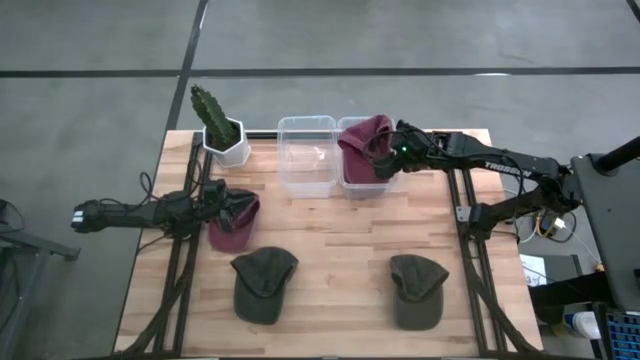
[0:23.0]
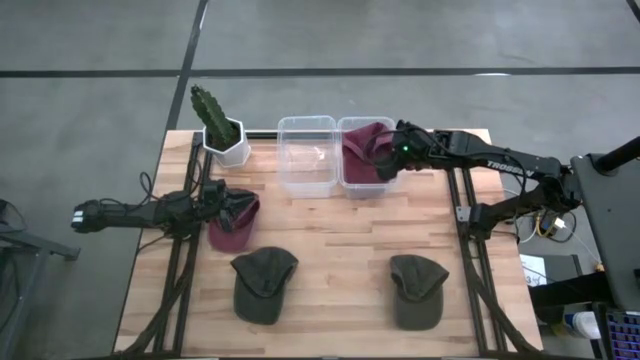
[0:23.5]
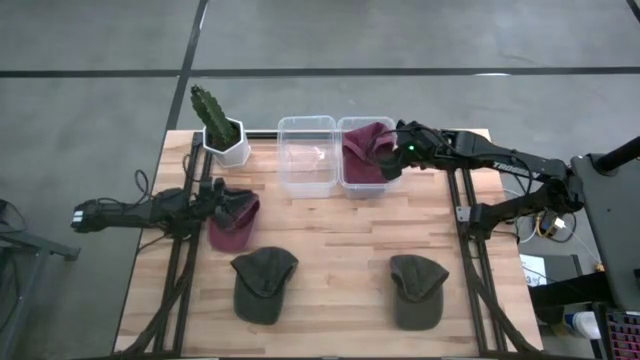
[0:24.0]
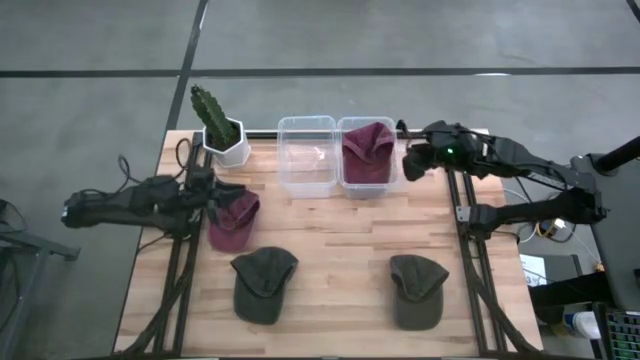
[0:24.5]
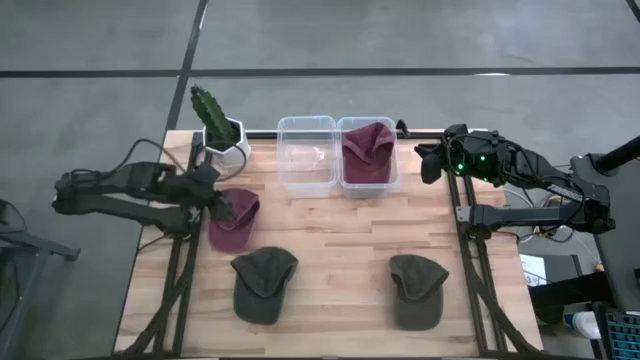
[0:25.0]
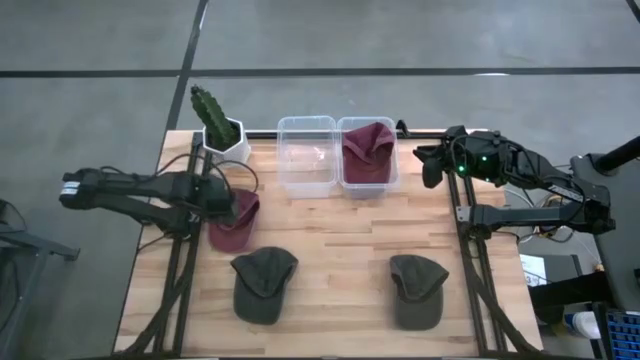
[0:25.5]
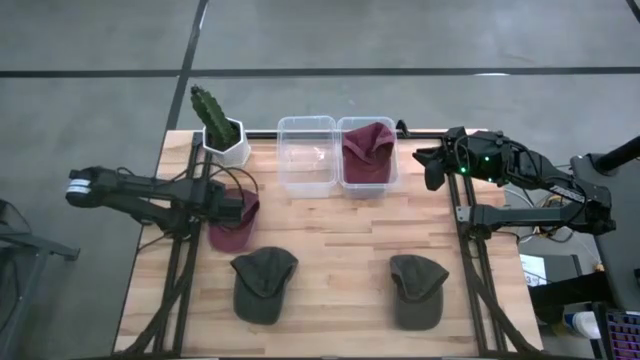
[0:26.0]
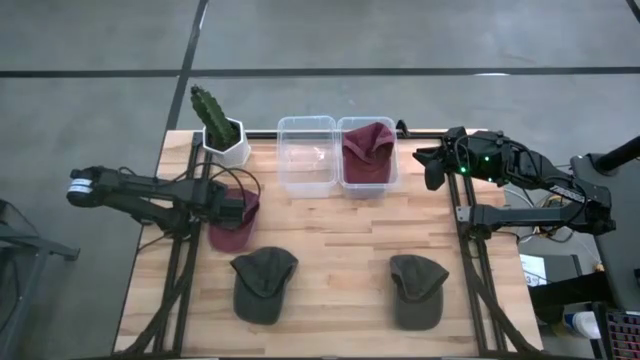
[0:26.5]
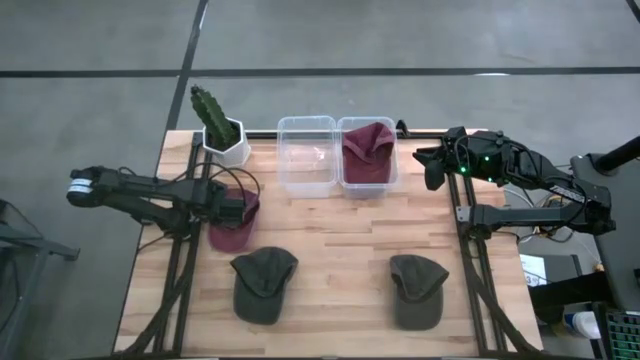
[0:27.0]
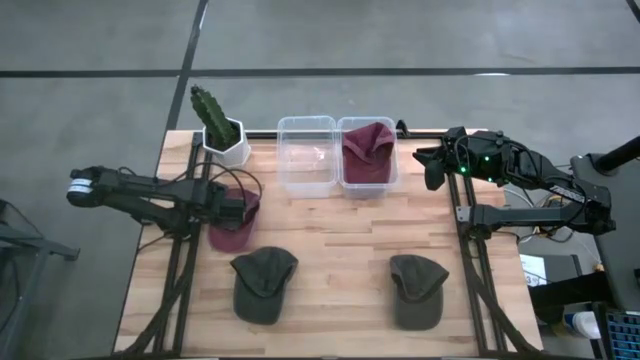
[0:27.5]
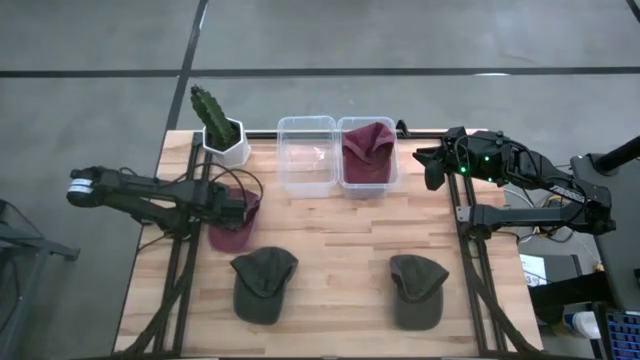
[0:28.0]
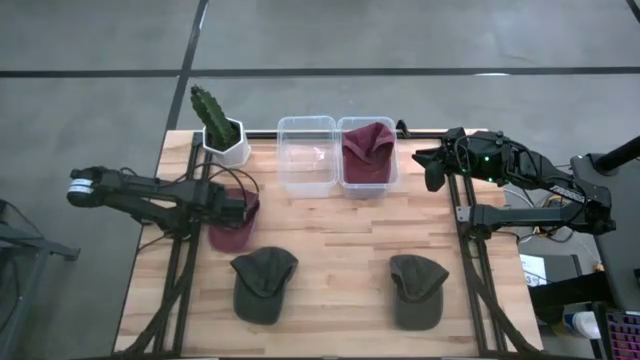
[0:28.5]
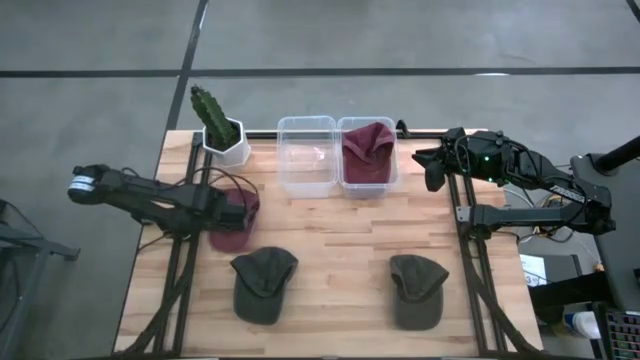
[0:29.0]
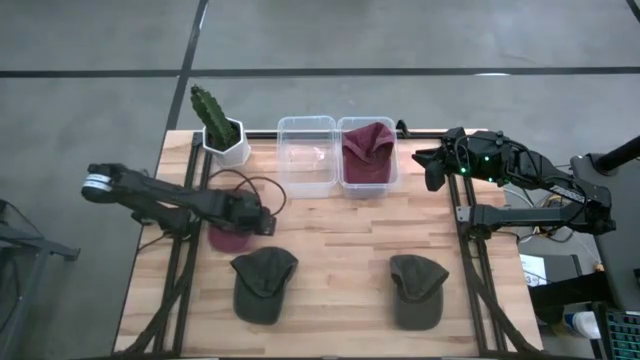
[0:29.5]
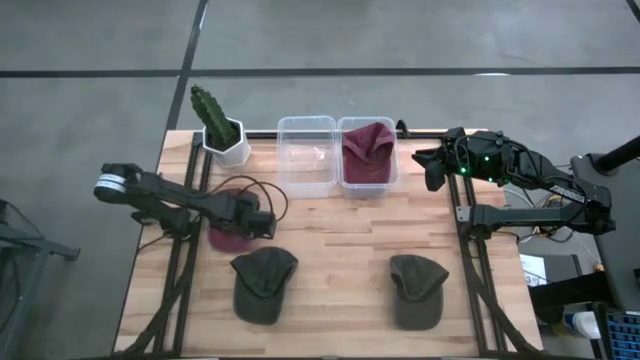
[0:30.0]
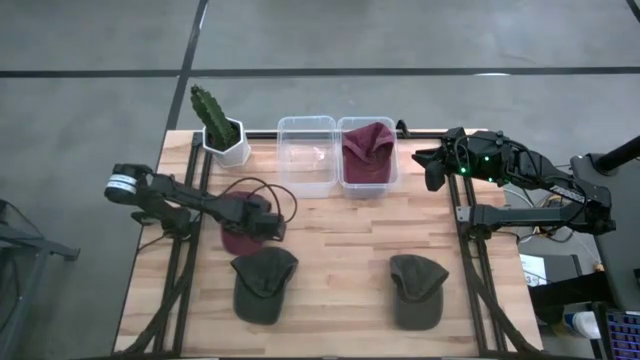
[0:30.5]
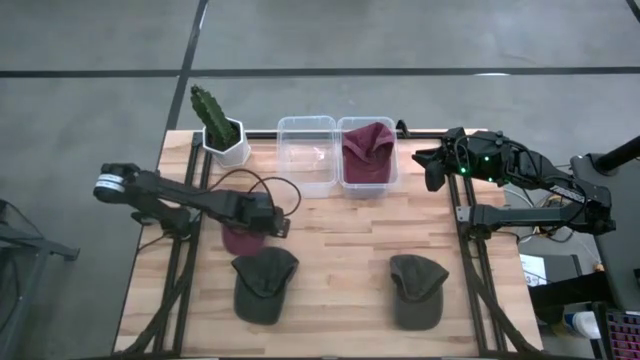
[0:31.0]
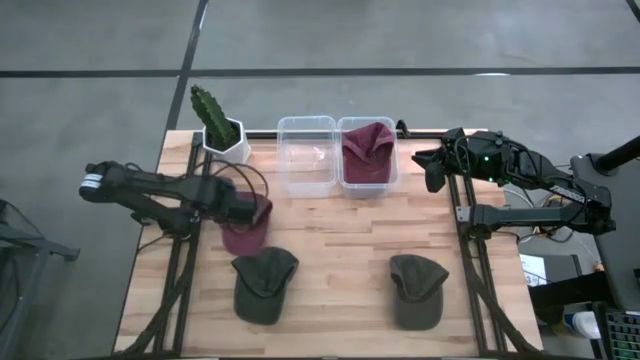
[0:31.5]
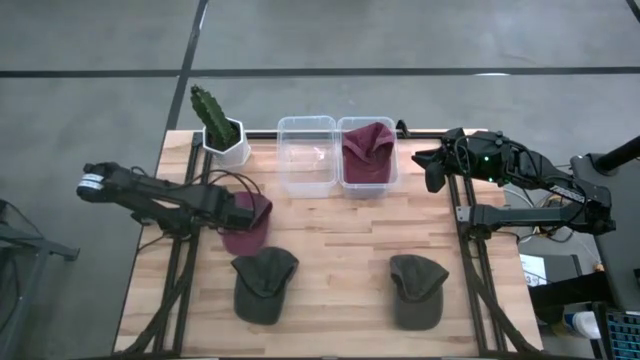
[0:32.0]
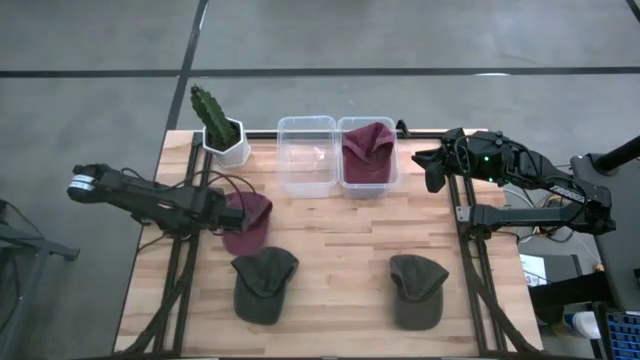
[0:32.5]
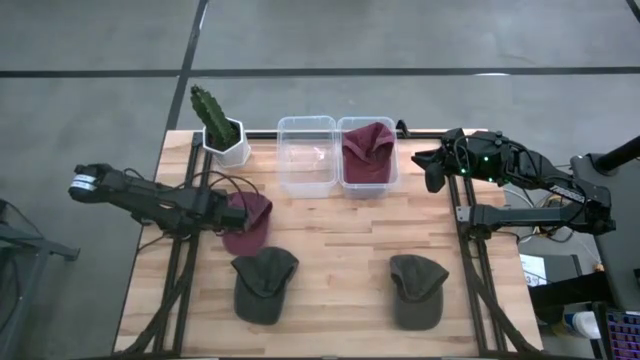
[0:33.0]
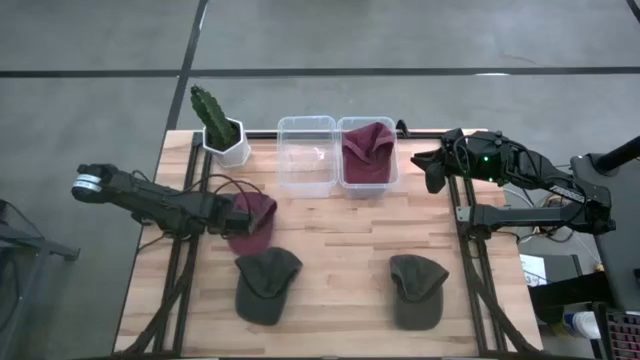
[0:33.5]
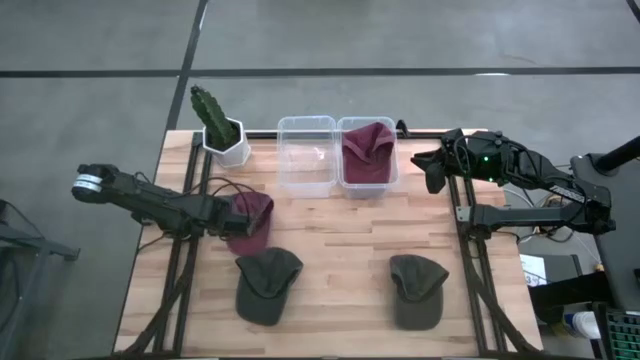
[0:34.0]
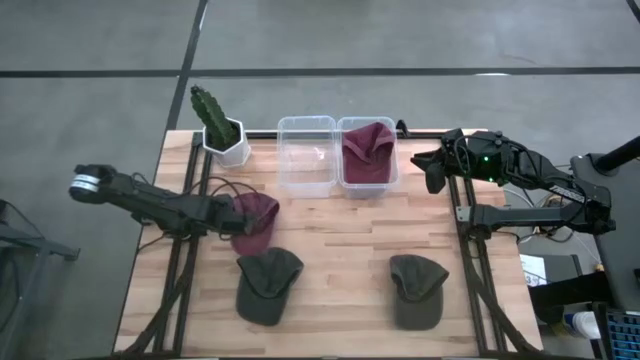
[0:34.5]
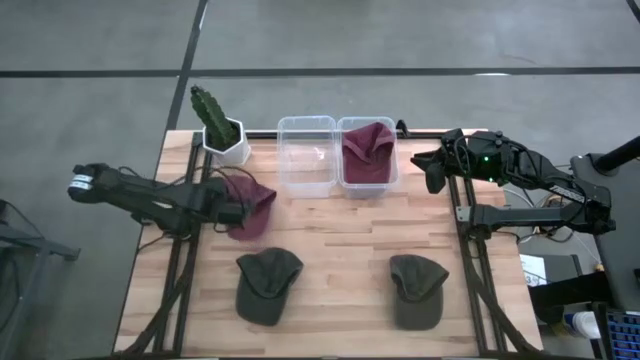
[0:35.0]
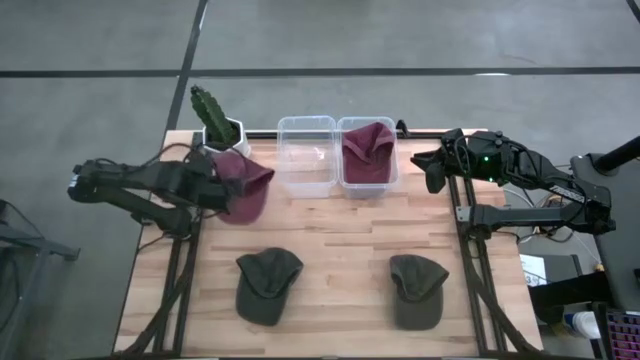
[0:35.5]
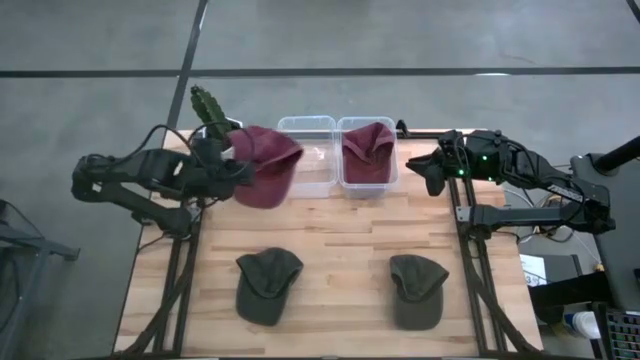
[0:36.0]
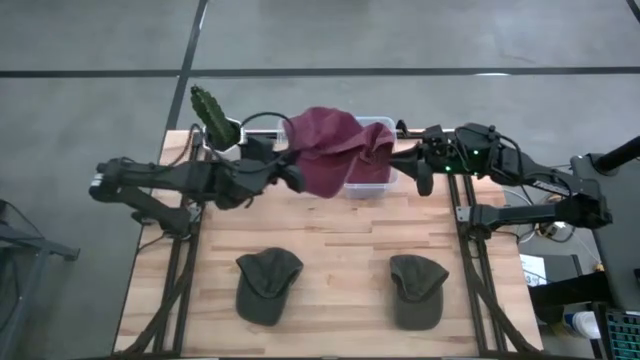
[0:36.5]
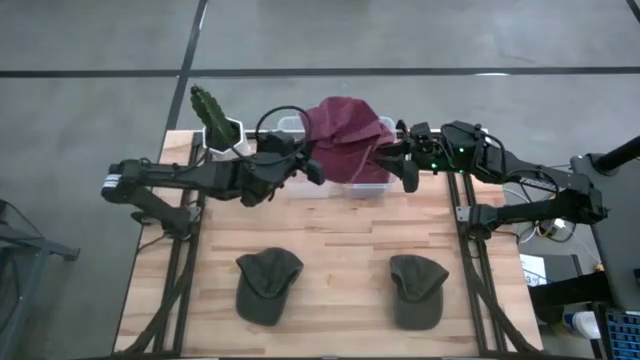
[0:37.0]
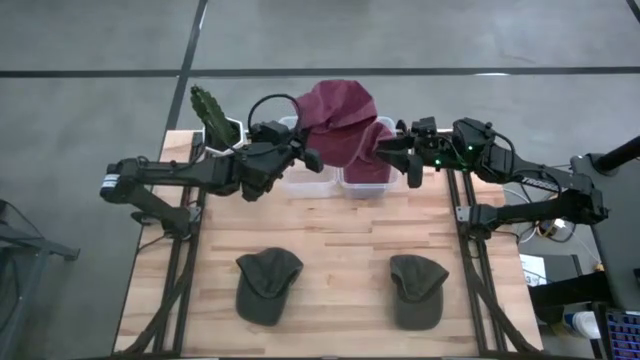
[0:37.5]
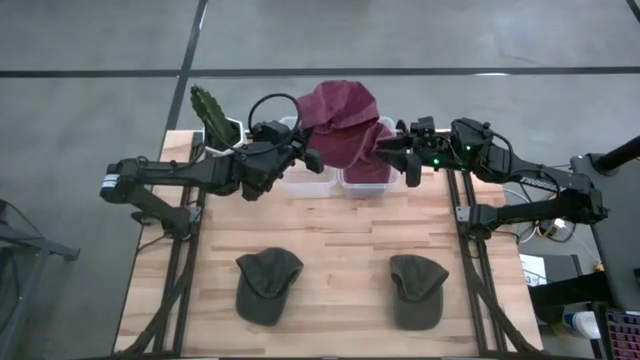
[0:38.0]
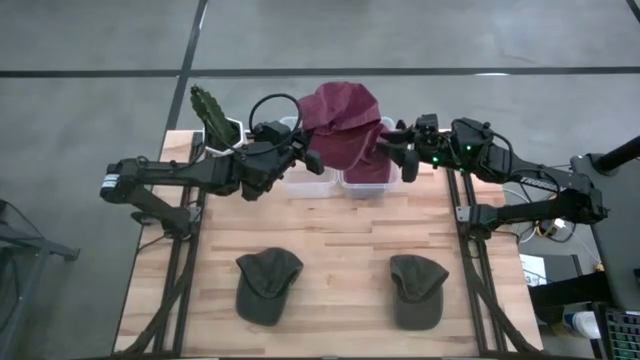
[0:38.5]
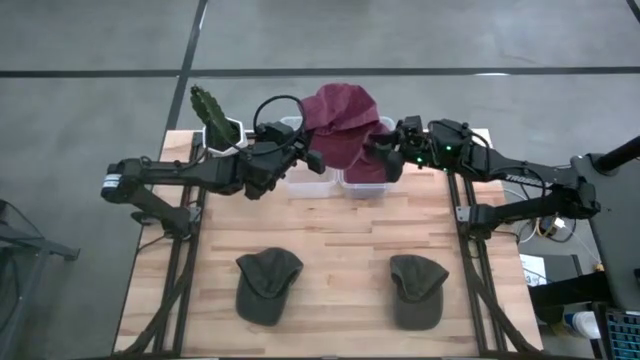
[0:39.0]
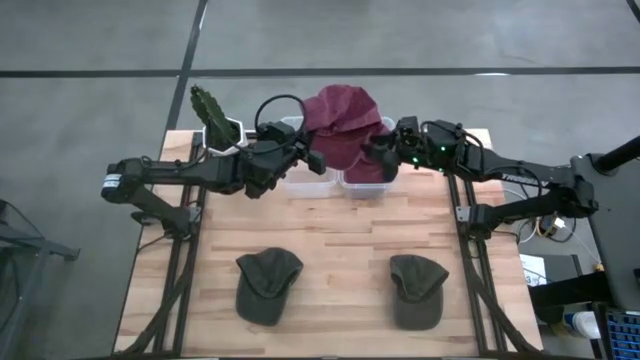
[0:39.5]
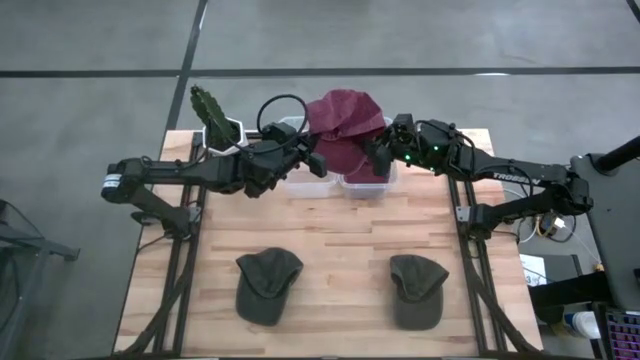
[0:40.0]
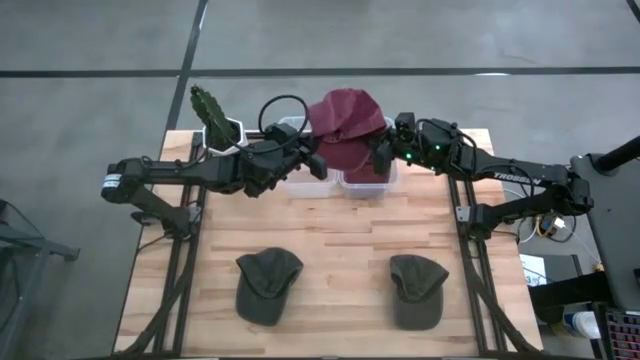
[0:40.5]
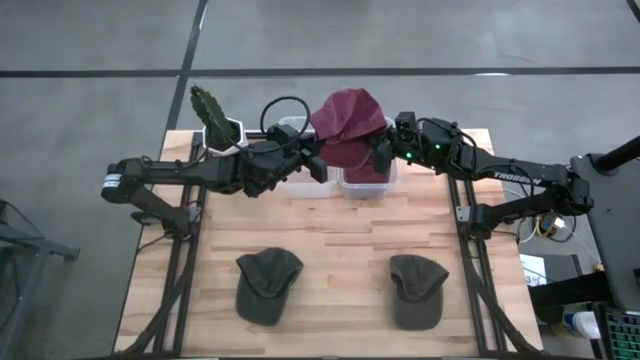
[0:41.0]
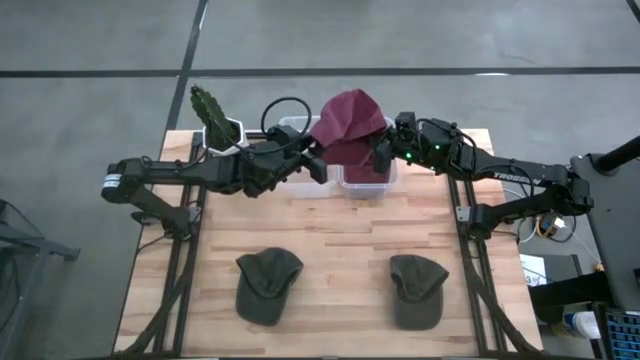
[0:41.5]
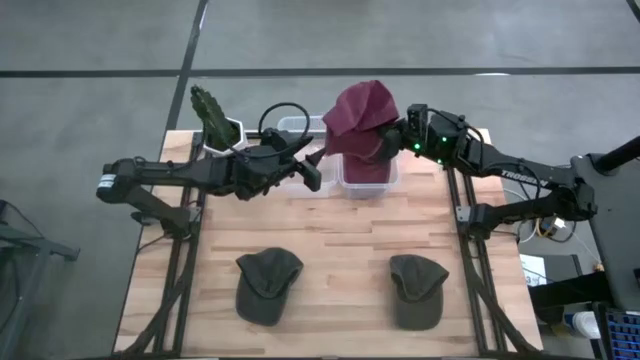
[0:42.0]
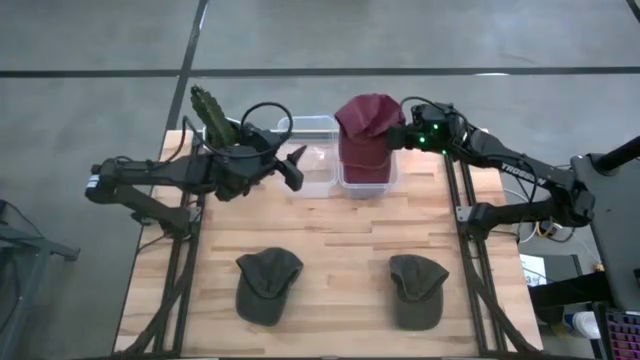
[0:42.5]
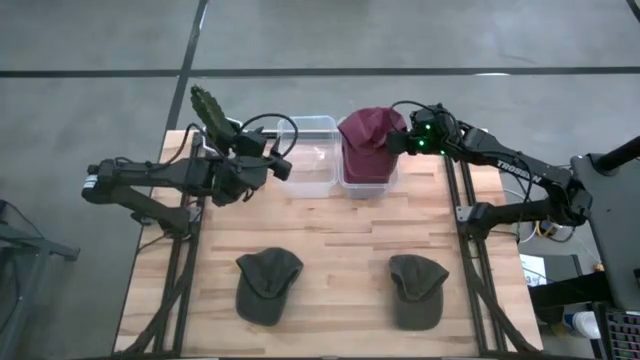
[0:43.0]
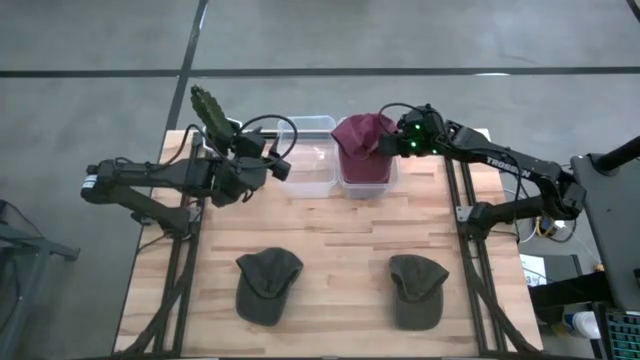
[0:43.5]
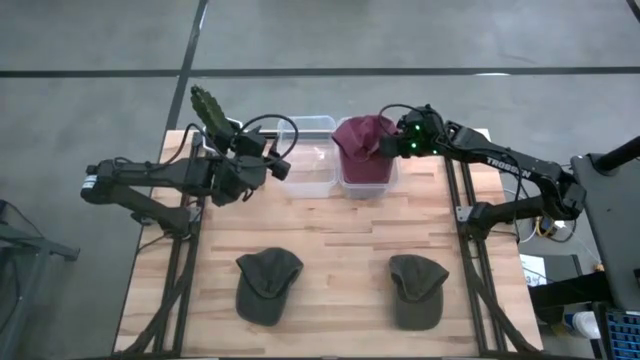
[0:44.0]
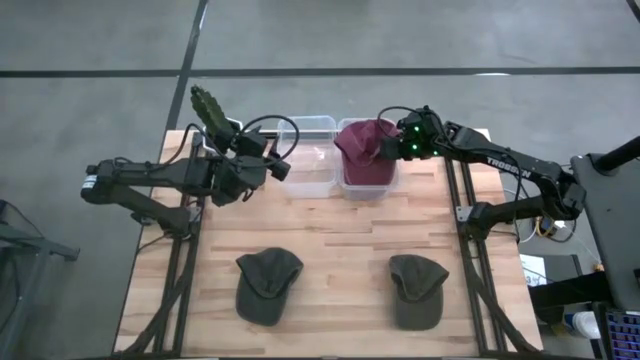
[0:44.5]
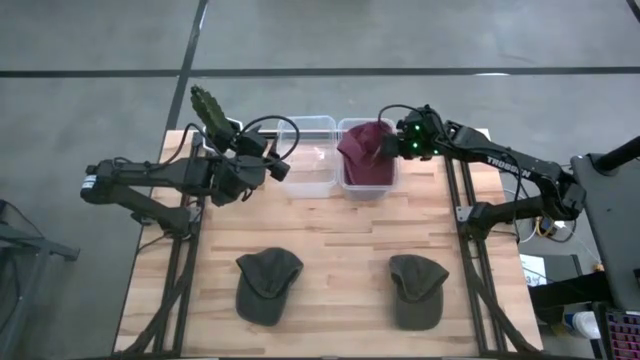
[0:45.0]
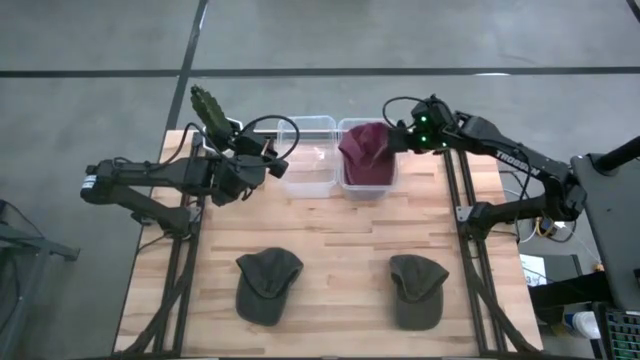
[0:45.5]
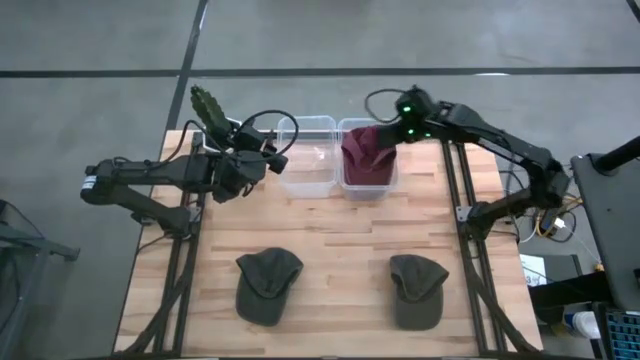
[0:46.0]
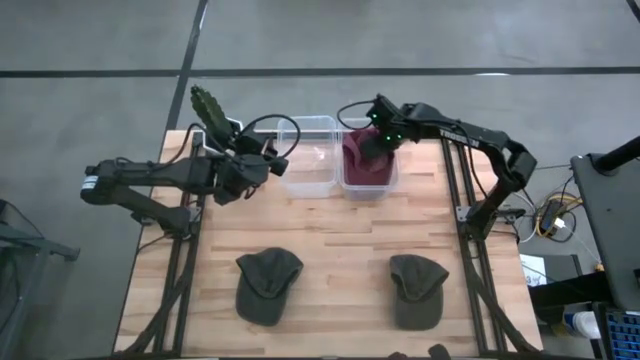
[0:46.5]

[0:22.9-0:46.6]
Task: Pick & Place hat
Put the red cap into the right transparent bin
